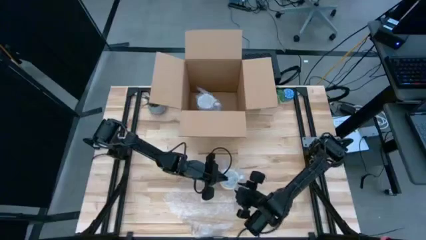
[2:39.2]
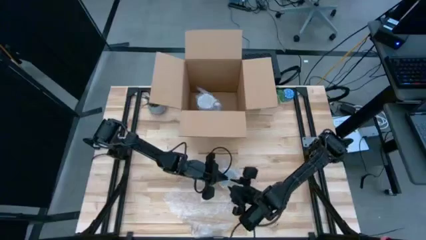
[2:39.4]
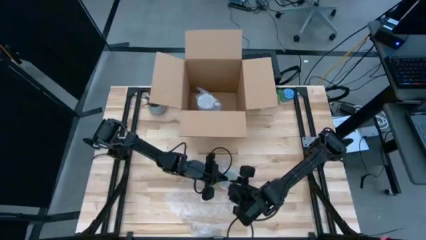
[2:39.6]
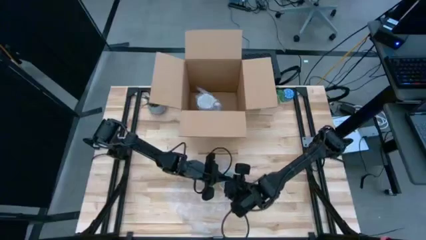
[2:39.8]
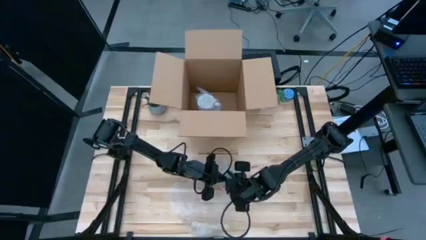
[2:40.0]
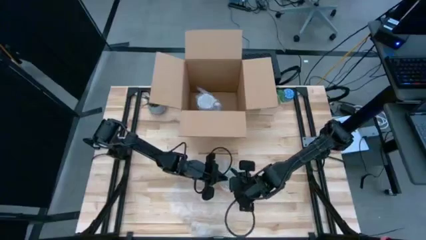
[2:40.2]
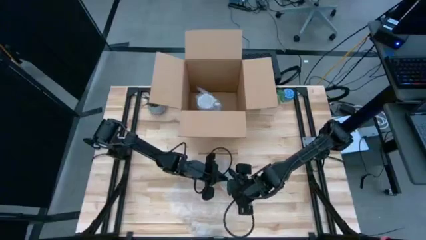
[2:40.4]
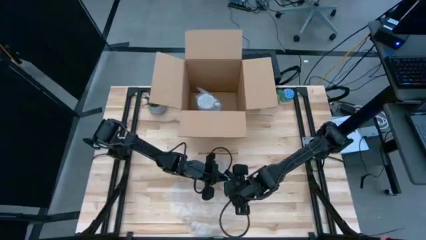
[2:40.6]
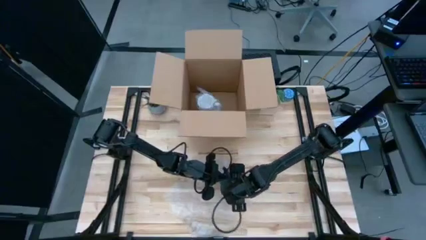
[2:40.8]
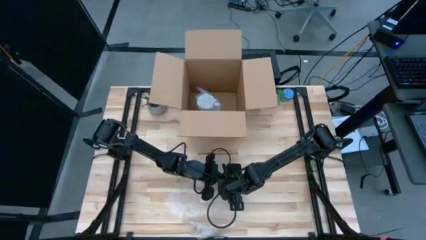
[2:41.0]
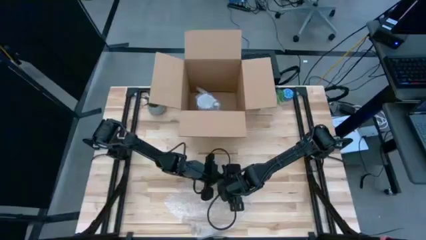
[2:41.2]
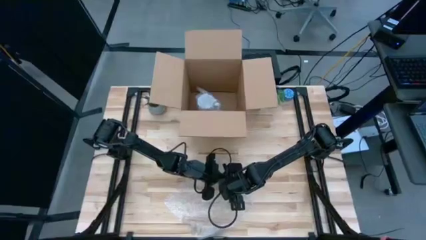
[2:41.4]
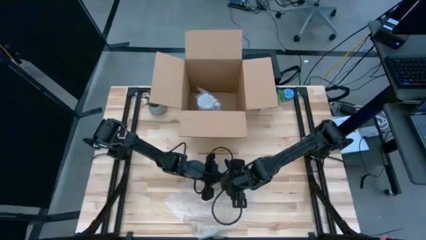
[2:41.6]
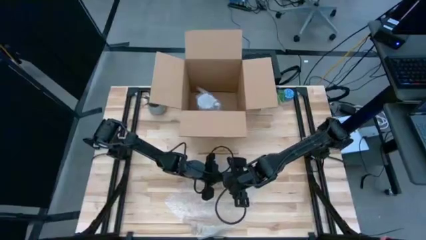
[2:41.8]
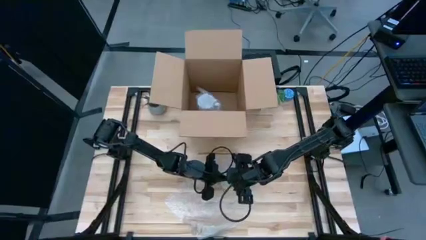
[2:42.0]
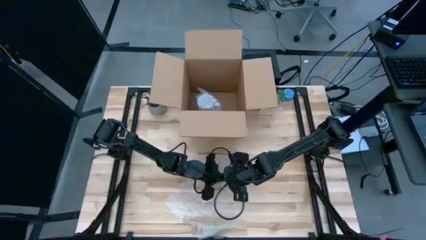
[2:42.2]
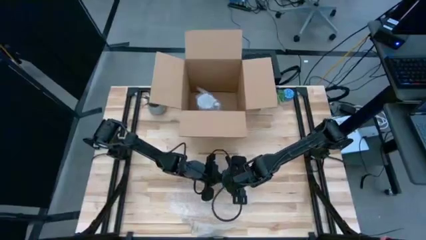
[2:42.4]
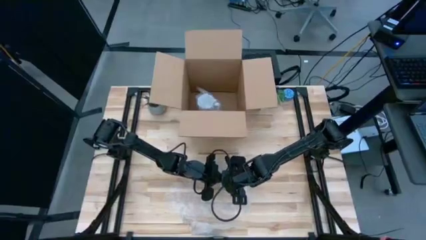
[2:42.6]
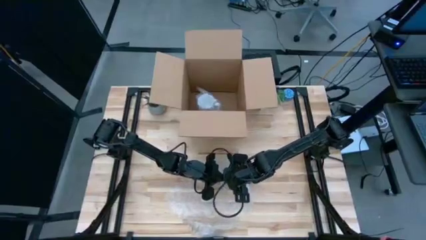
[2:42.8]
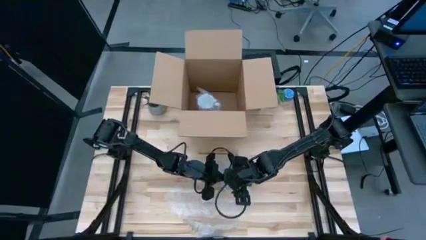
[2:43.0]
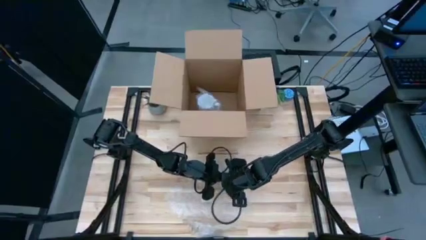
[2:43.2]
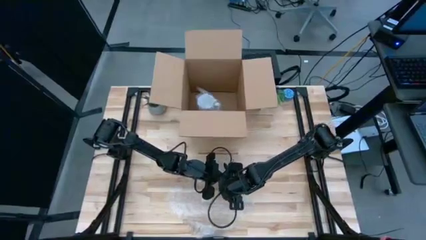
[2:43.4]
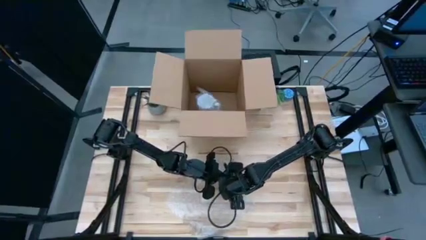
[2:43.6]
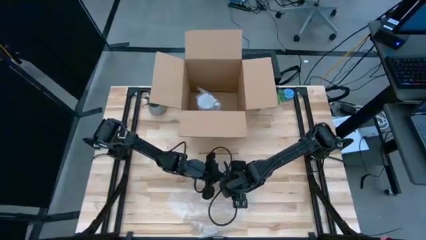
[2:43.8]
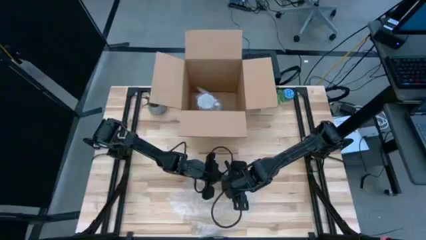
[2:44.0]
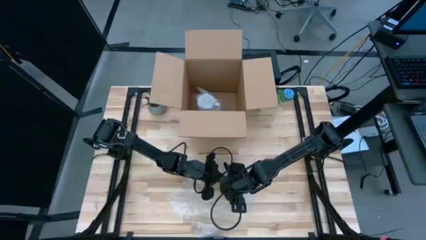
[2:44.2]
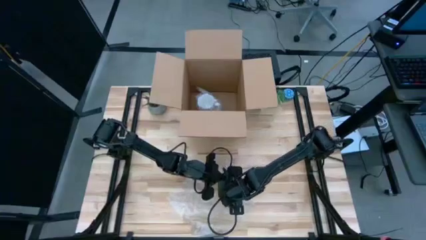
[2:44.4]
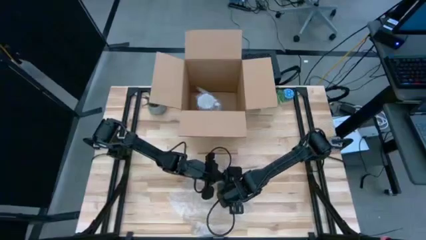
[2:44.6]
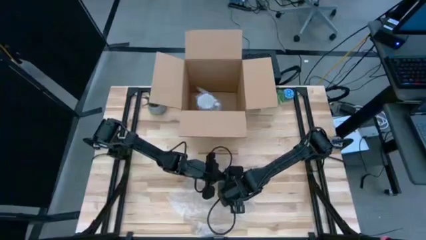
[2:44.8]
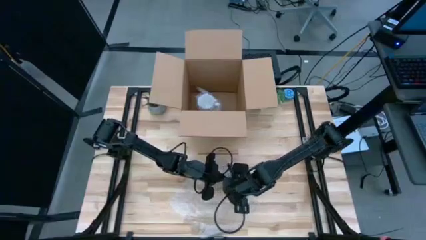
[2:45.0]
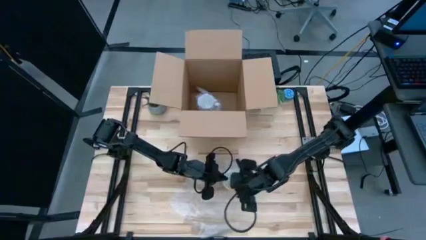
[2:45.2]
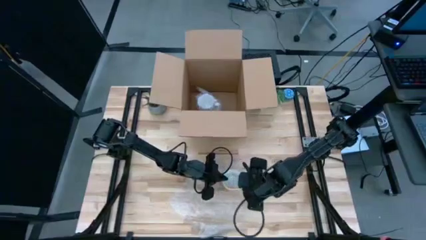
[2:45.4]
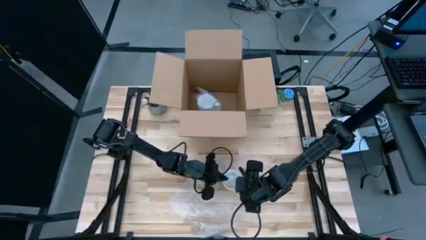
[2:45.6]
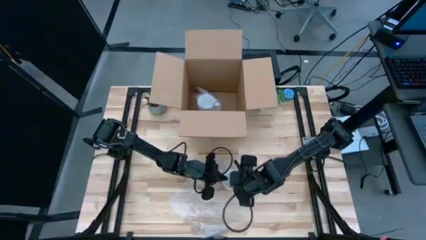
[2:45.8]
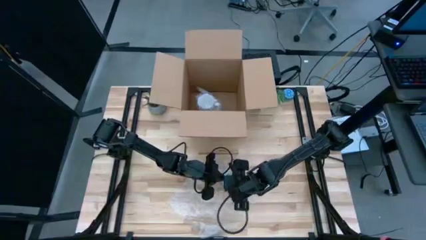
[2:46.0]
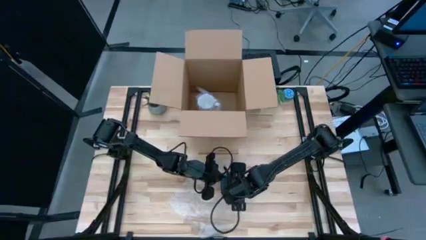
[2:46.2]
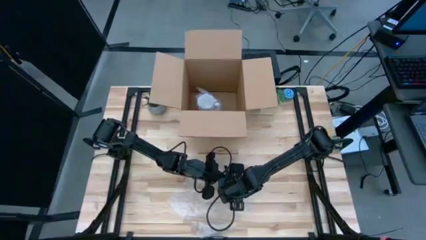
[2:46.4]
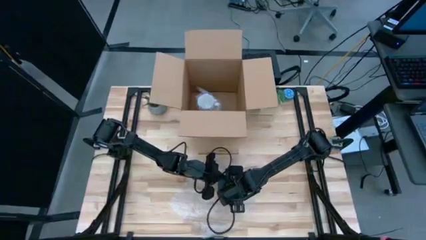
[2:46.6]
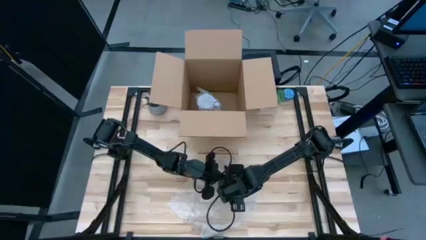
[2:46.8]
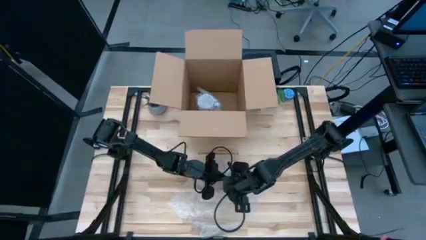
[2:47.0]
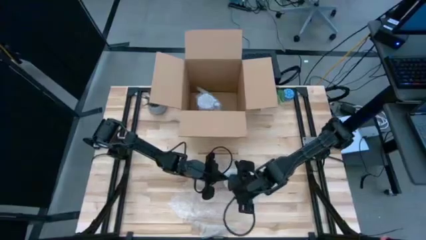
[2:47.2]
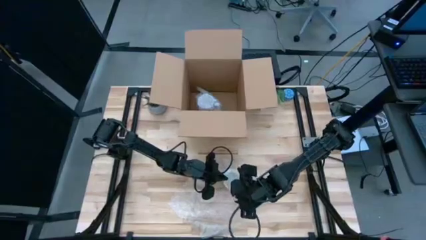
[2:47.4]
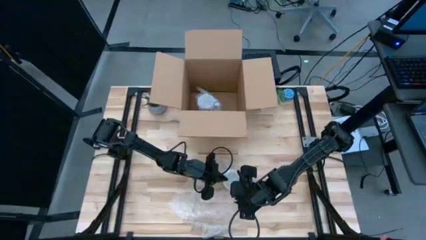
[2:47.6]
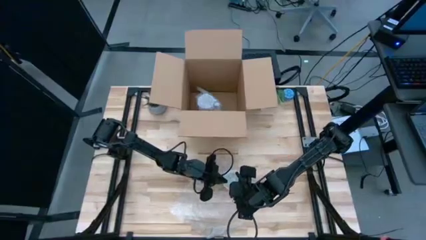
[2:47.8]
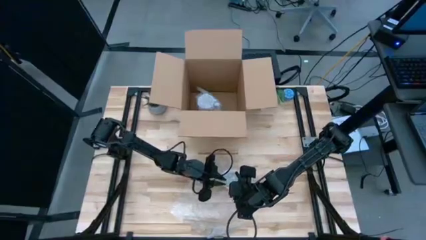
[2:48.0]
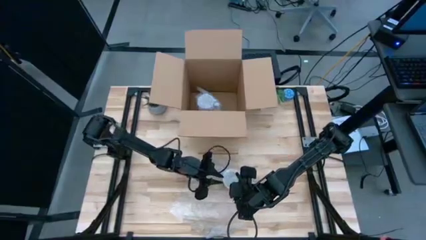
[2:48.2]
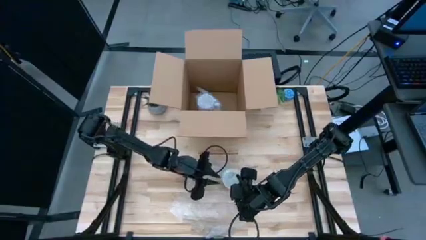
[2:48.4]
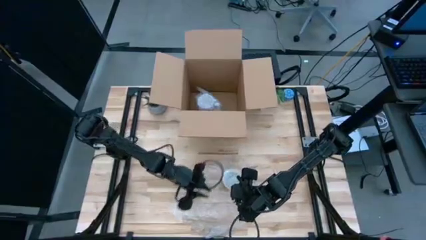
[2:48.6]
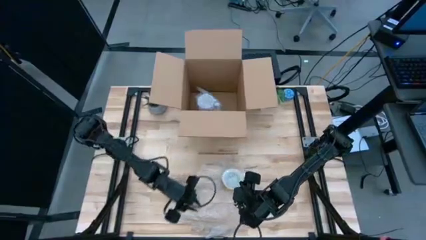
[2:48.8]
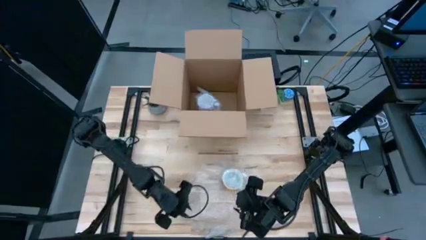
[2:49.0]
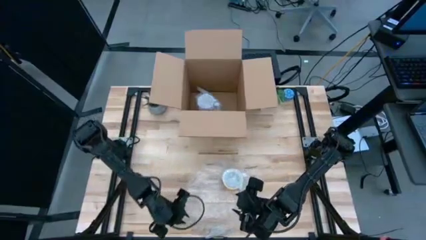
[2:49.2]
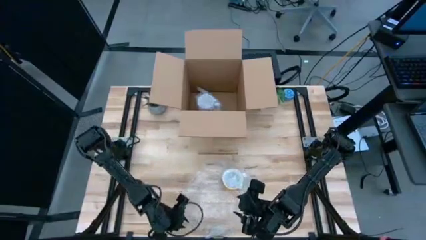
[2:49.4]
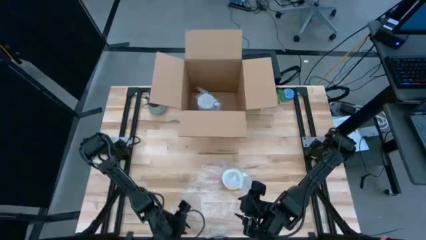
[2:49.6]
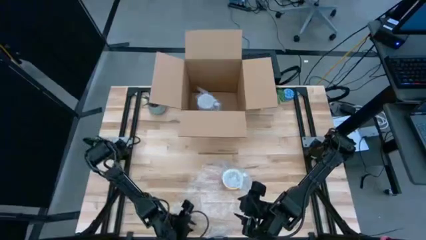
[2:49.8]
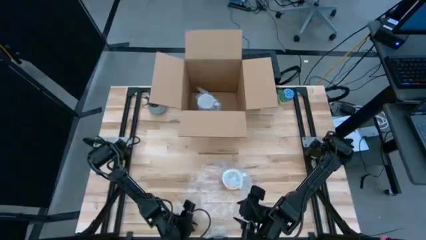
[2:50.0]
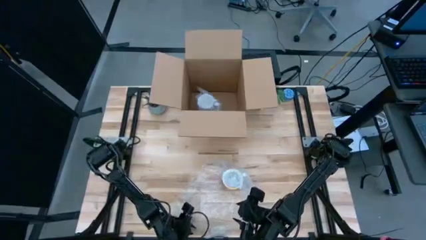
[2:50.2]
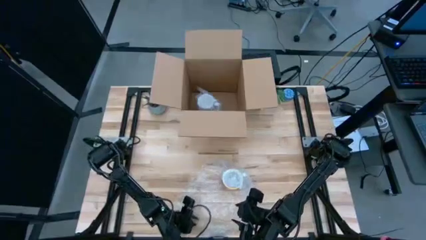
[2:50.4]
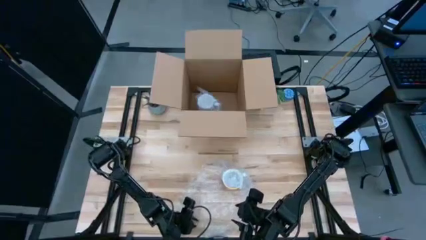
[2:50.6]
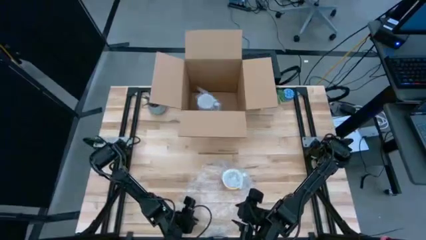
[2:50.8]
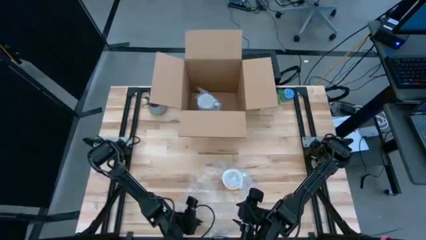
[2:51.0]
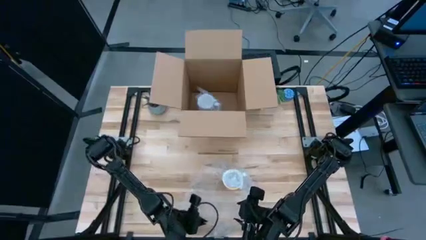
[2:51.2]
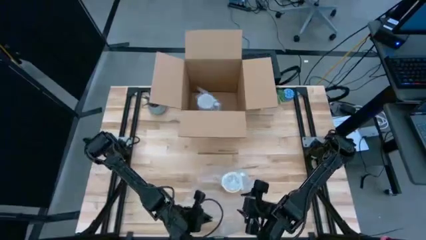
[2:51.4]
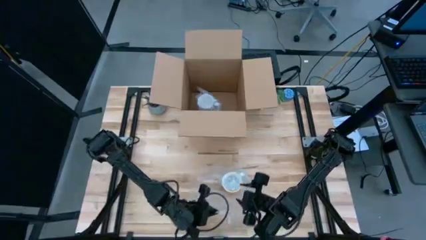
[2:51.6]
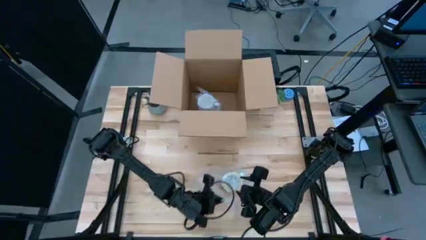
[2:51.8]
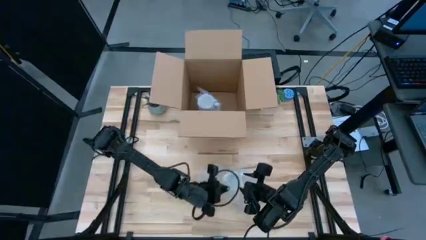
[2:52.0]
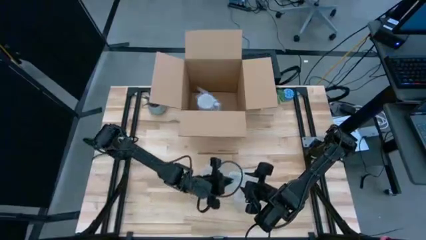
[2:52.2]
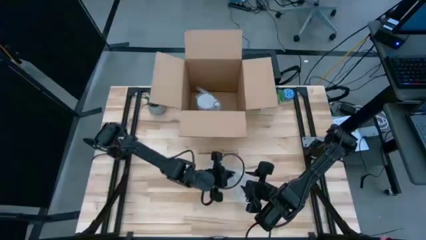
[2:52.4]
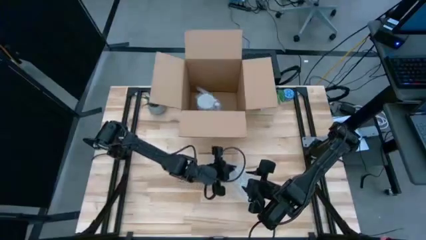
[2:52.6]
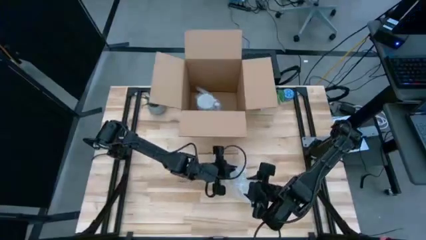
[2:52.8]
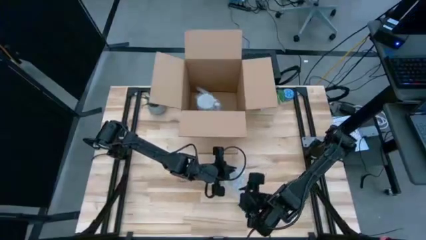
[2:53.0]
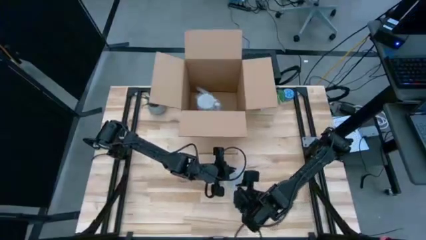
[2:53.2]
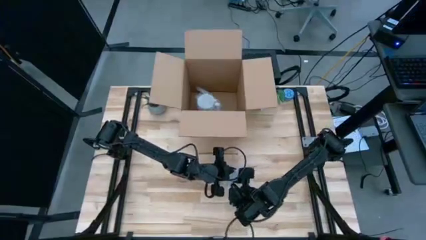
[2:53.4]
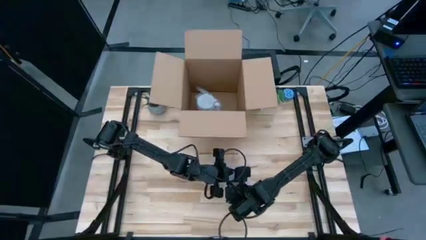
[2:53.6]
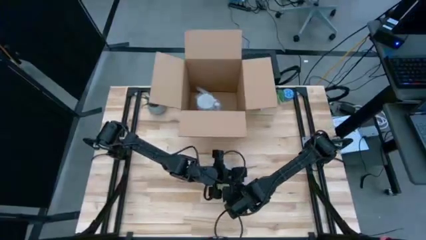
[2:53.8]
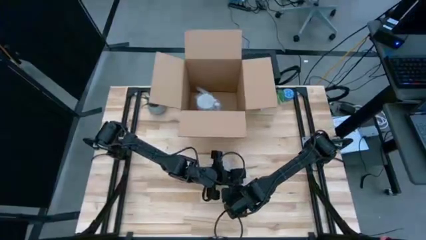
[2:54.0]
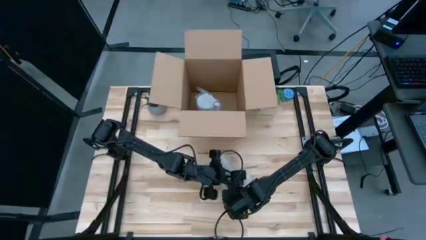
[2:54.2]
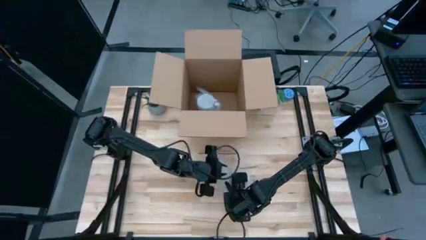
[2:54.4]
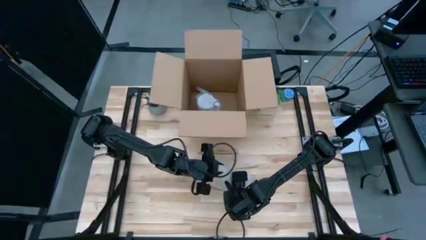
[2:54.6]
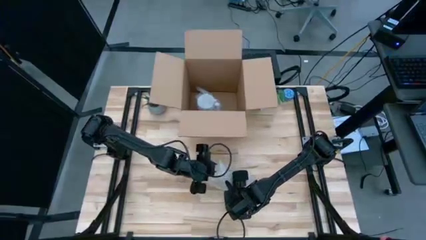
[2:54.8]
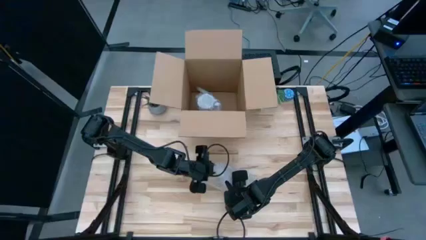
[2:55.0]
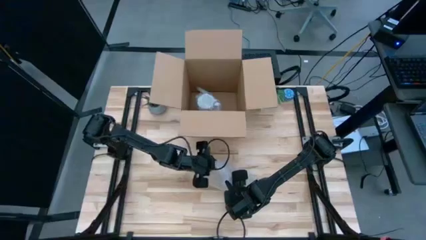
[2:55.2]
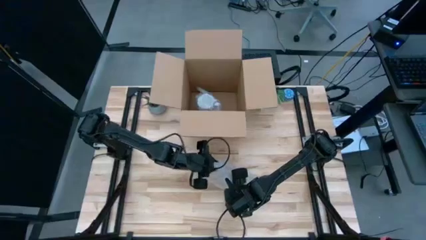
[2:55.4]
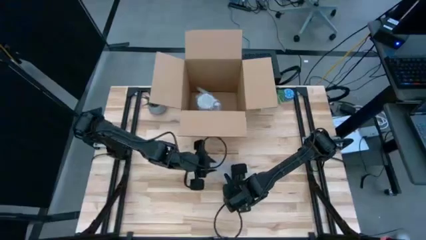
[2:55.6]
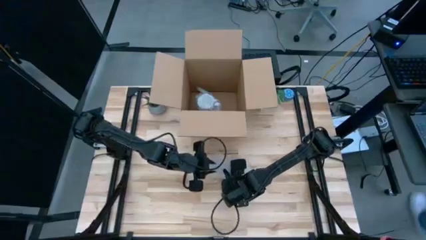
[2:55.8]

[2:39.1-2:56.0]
Task: wrap mug
Wrap the orange mug with bubble wrap
